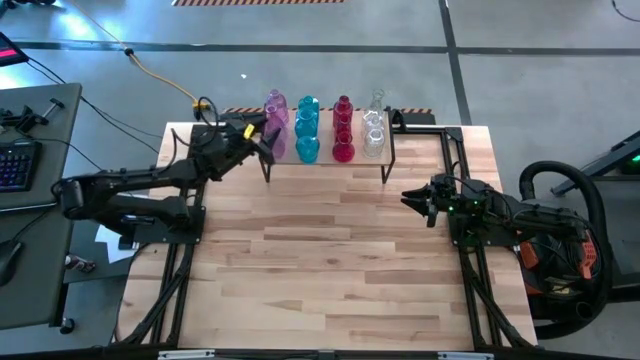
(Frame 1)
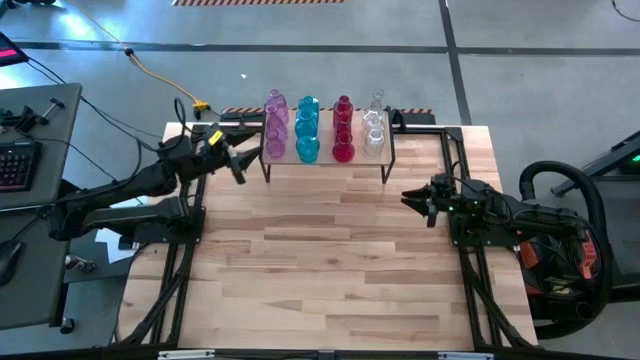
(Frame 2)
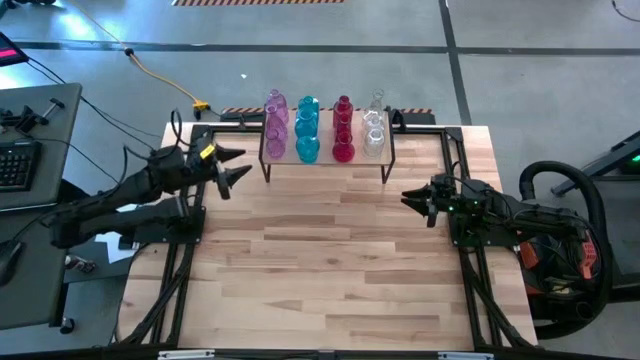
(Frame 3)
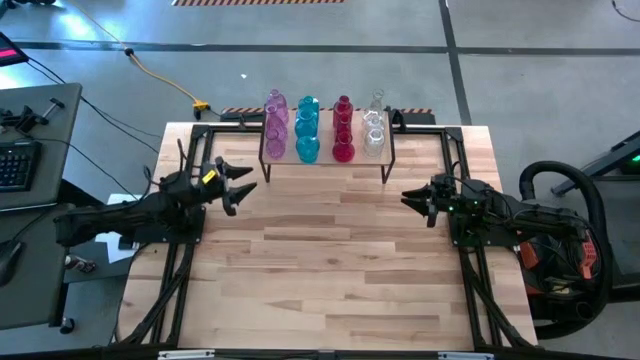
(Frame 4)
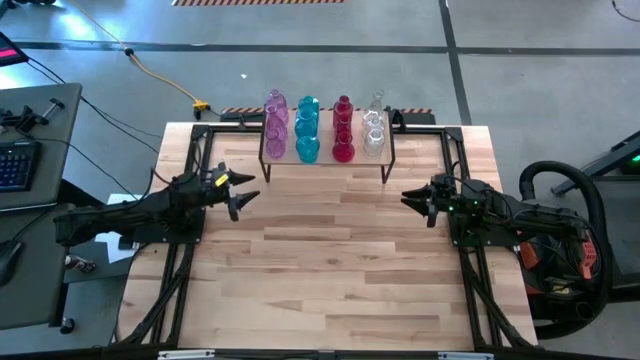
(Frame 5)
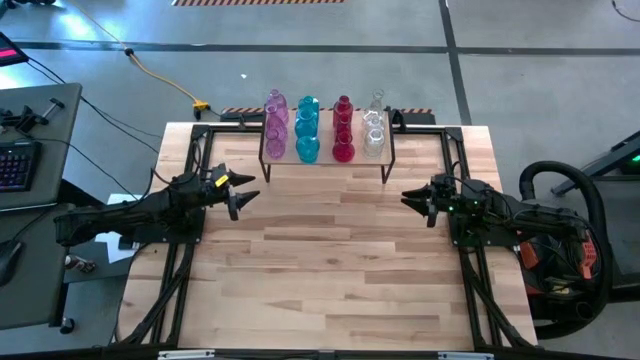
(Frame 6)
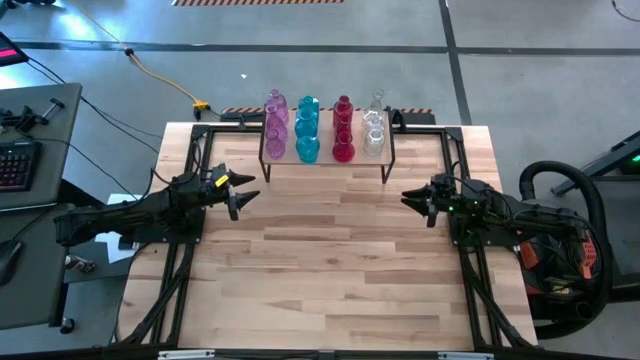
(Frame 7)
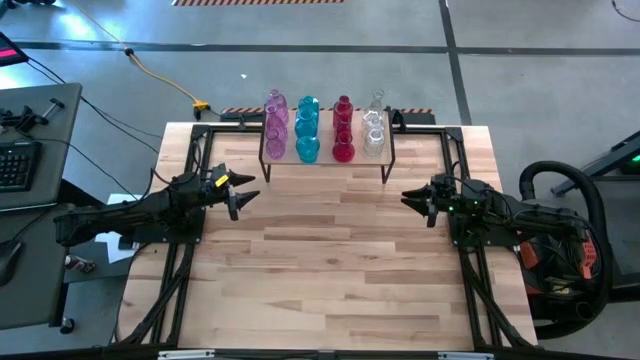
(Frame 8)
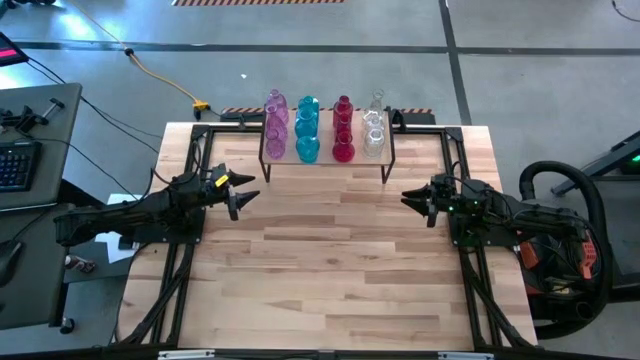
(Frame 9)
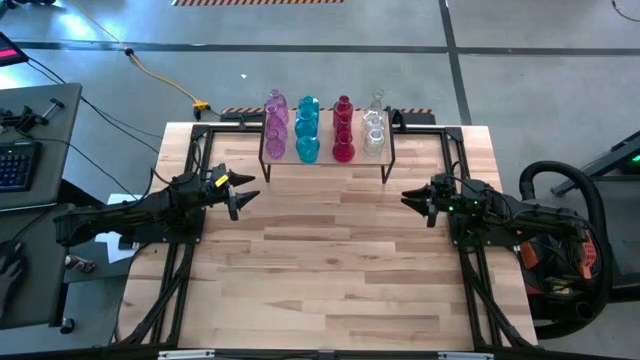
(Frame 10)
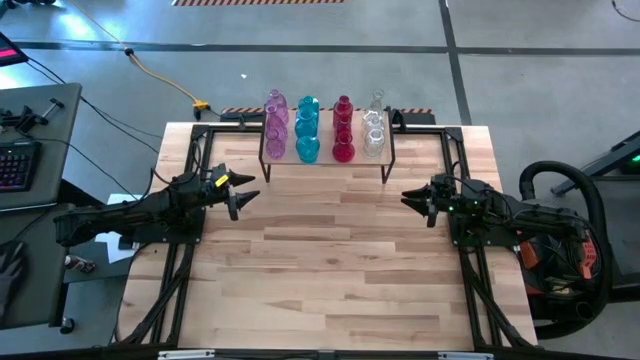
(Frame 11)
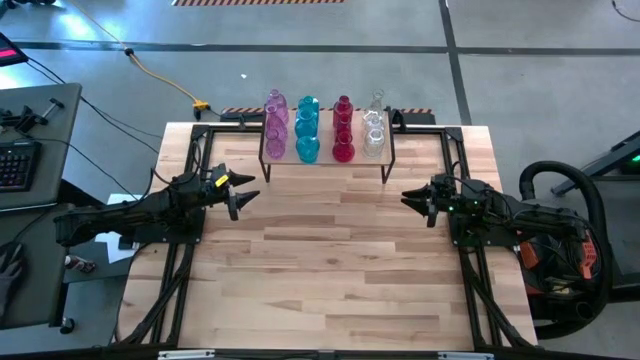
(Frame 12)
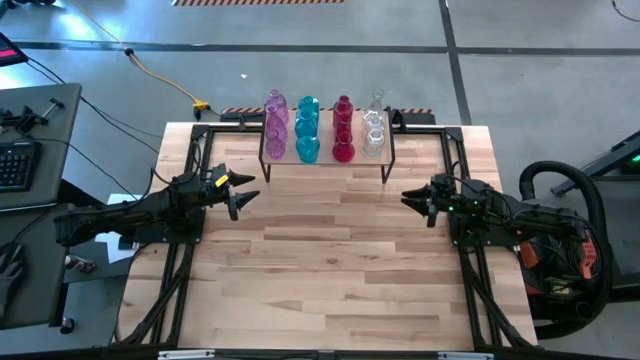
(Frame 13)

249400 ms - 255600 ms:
Task: sort vases onto shelf
Return to Home Position

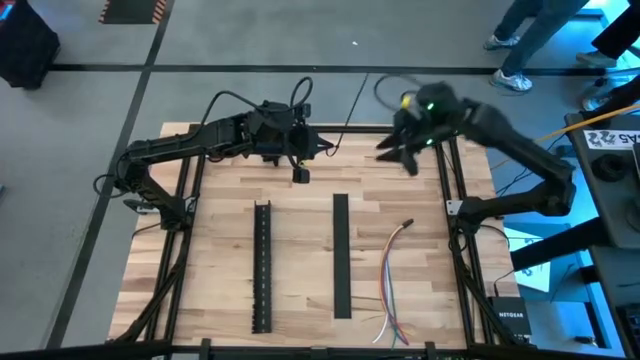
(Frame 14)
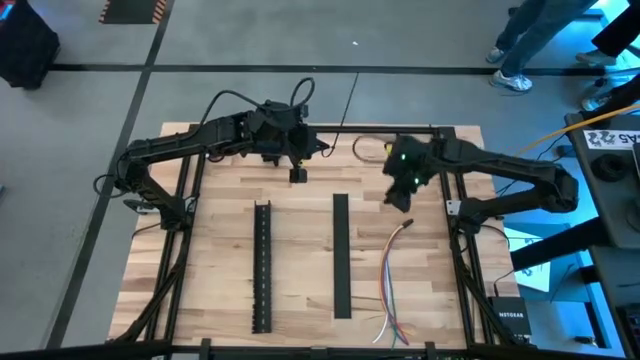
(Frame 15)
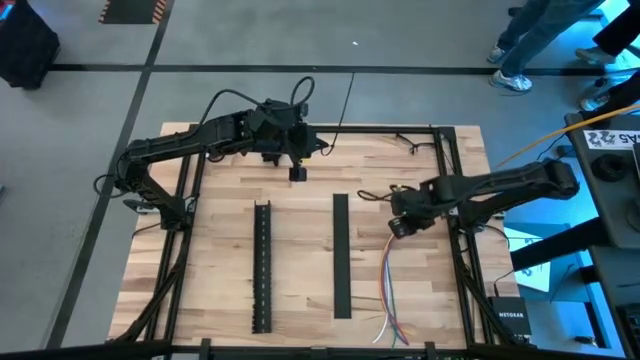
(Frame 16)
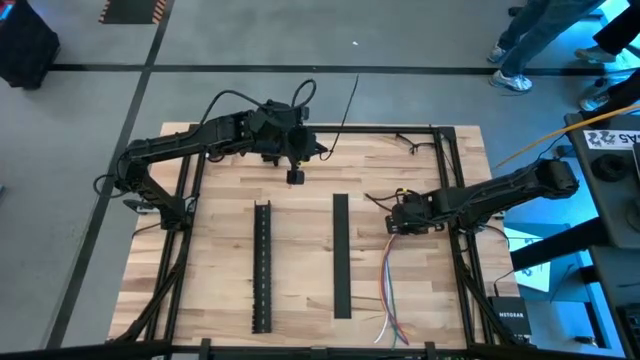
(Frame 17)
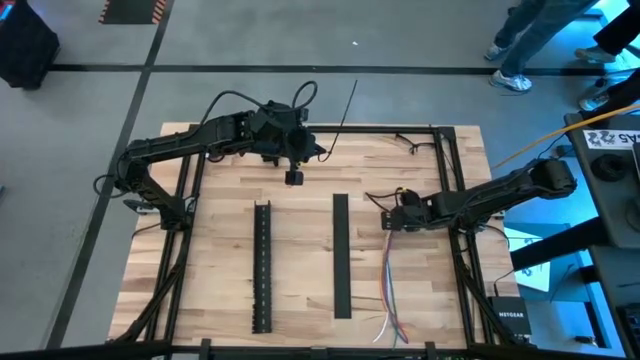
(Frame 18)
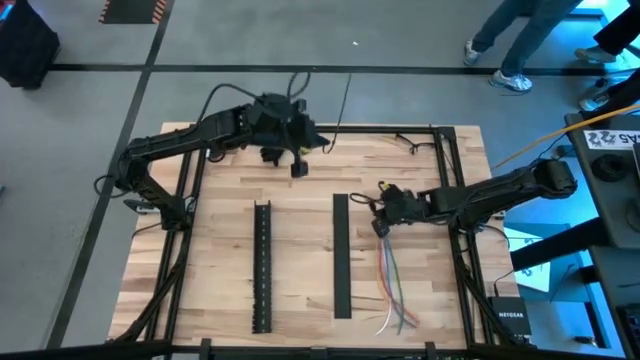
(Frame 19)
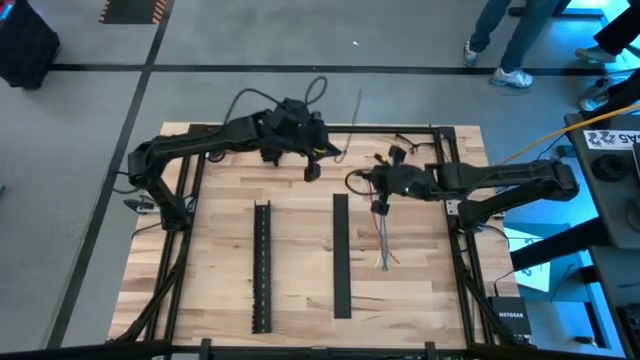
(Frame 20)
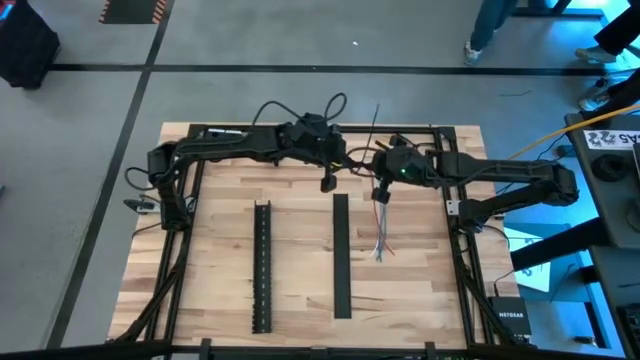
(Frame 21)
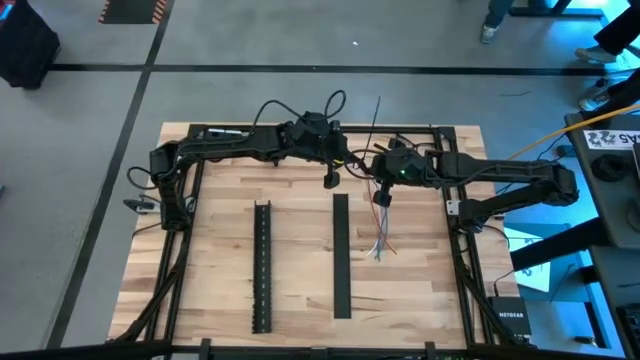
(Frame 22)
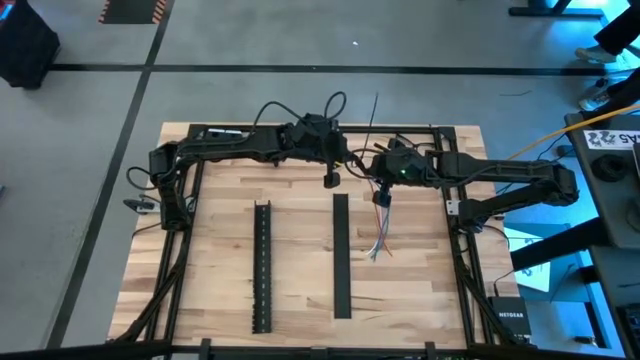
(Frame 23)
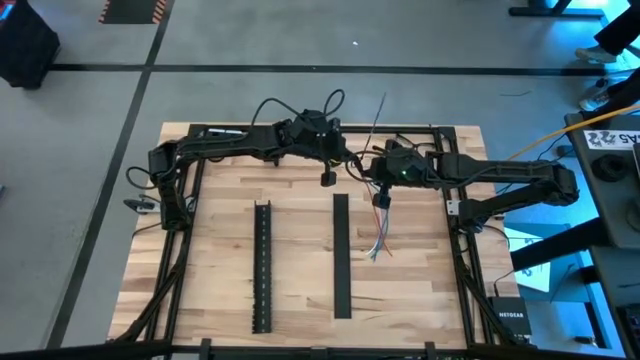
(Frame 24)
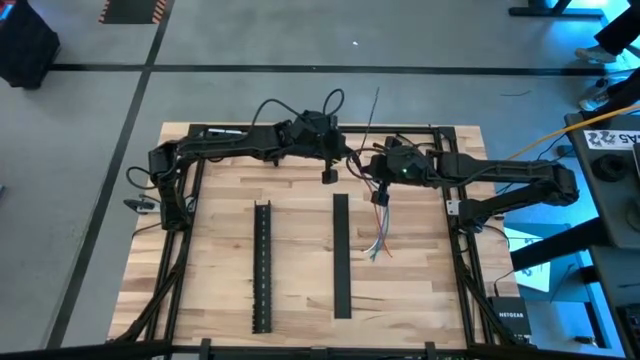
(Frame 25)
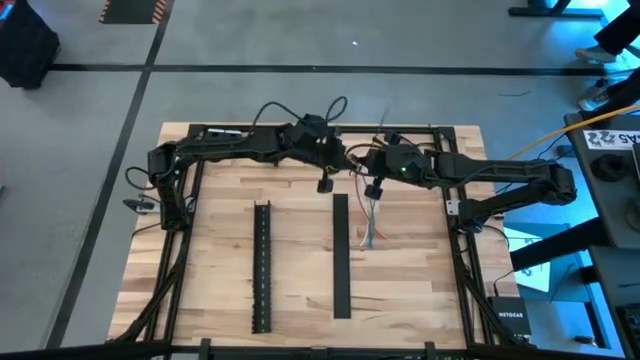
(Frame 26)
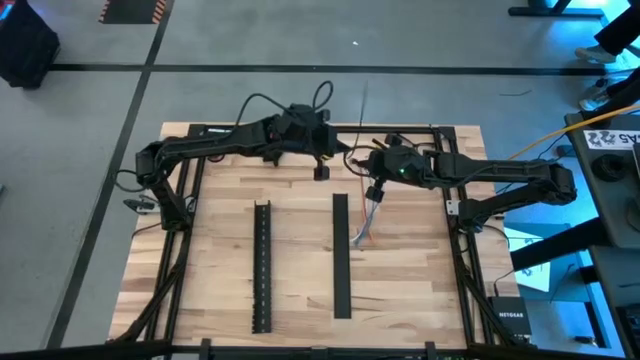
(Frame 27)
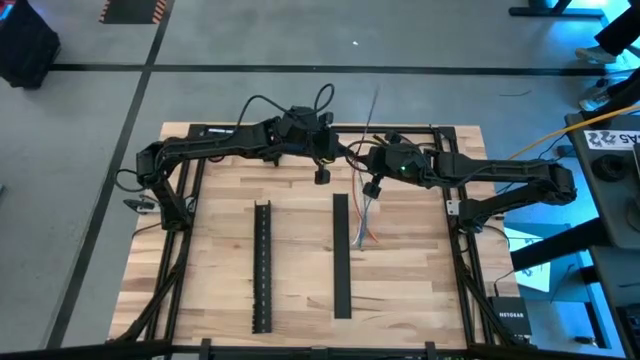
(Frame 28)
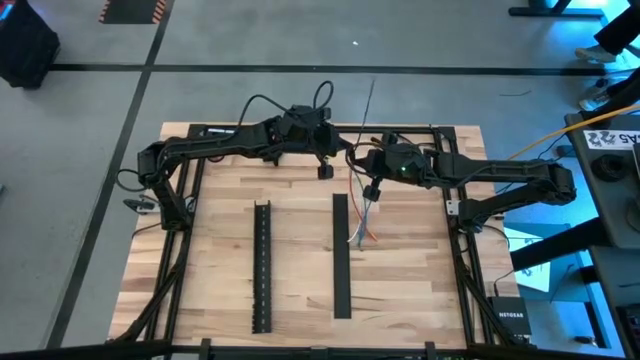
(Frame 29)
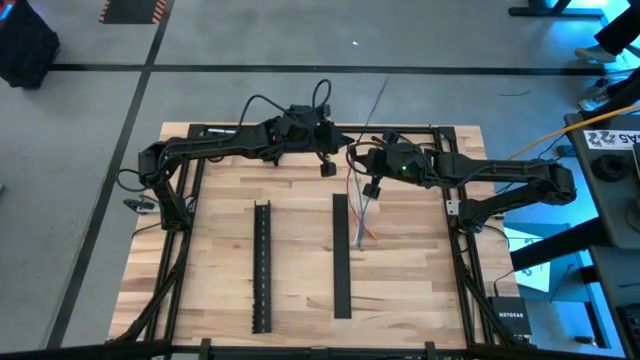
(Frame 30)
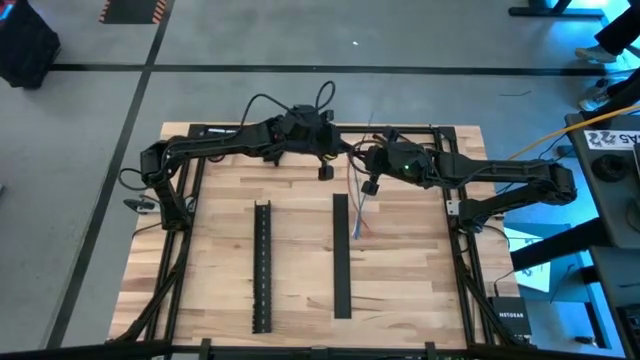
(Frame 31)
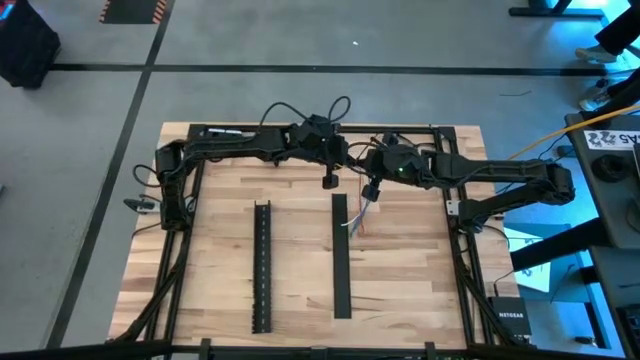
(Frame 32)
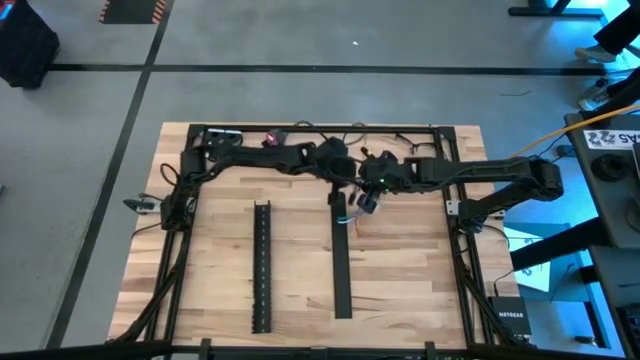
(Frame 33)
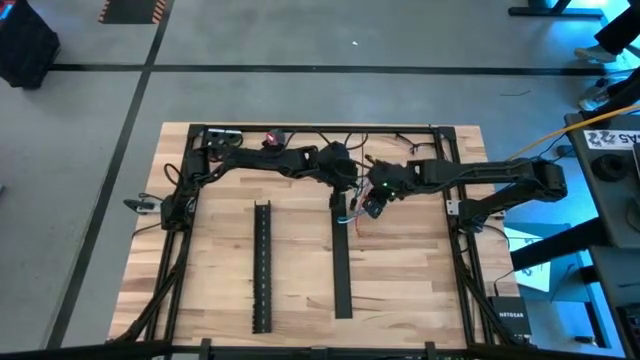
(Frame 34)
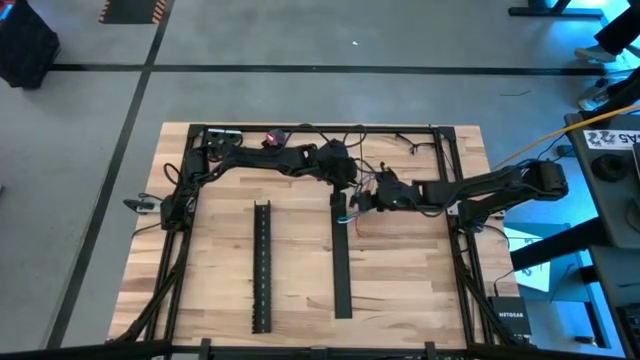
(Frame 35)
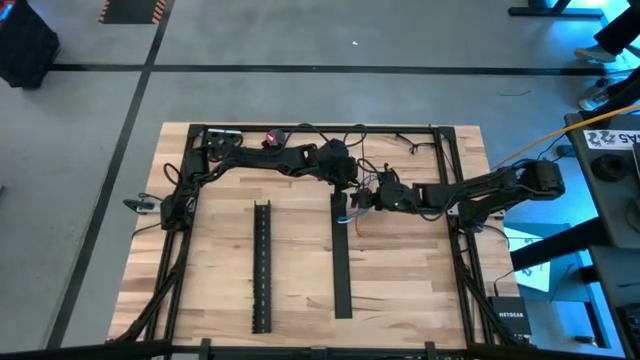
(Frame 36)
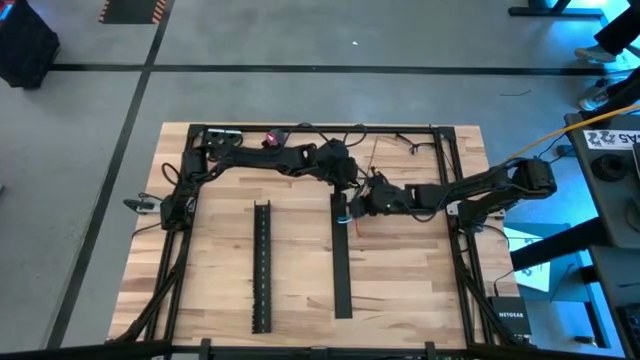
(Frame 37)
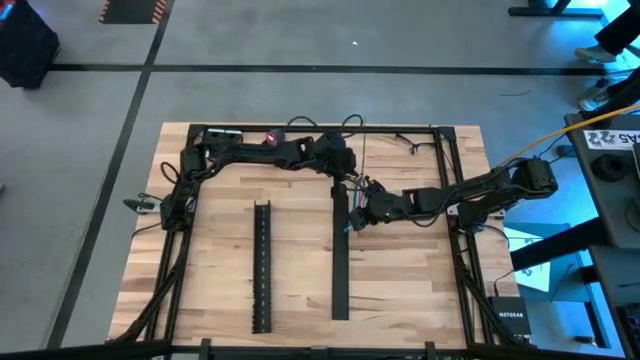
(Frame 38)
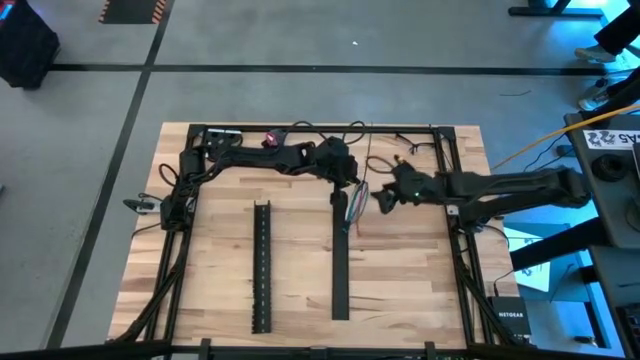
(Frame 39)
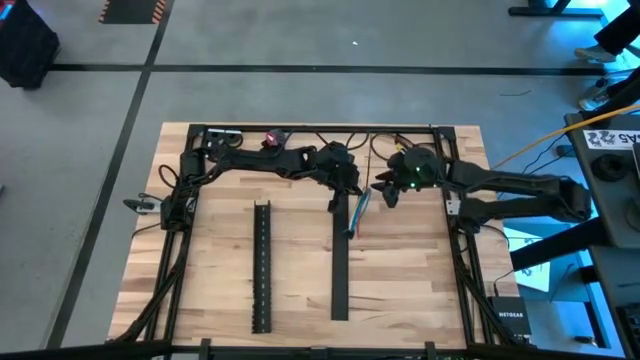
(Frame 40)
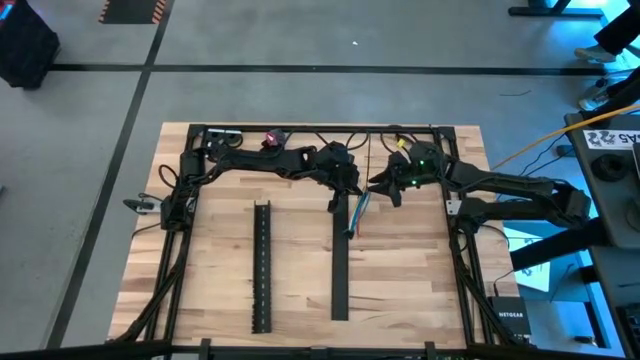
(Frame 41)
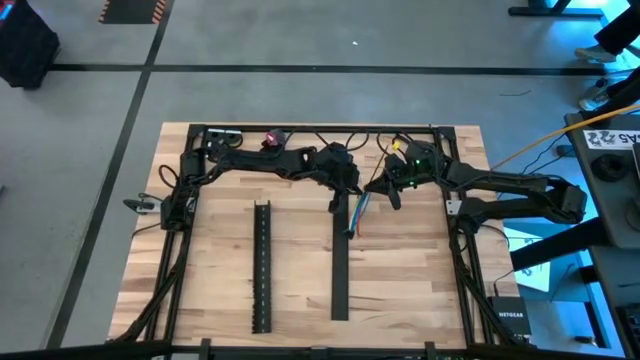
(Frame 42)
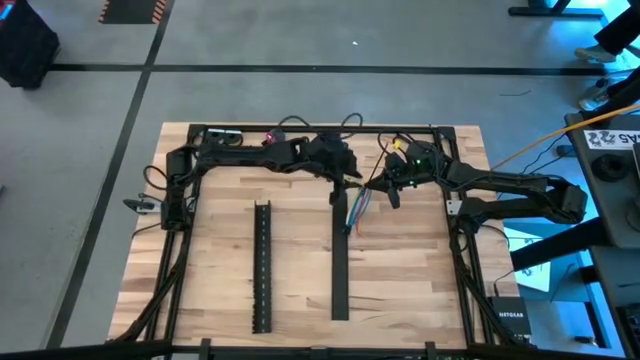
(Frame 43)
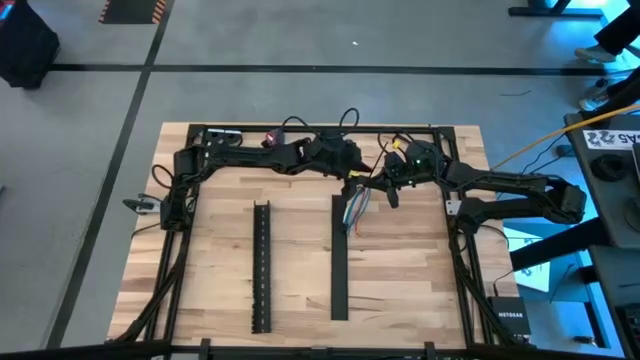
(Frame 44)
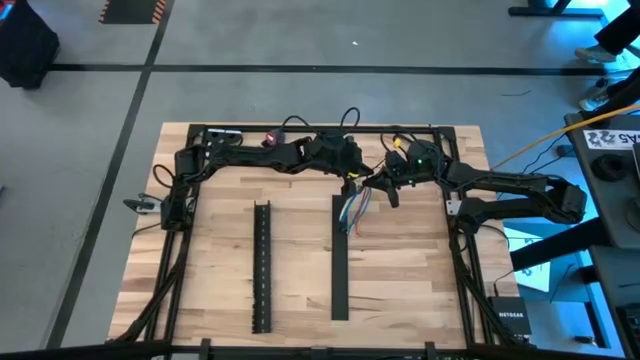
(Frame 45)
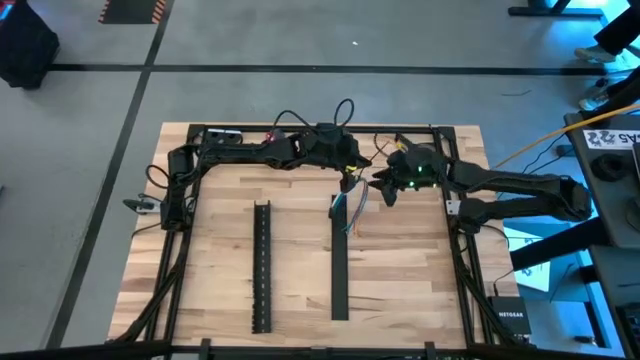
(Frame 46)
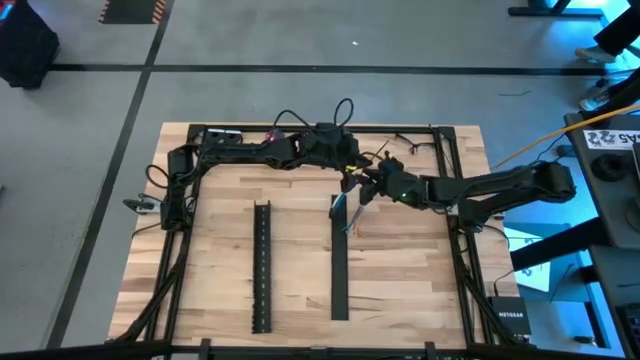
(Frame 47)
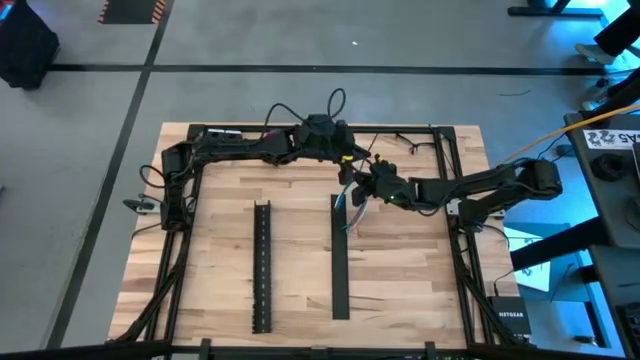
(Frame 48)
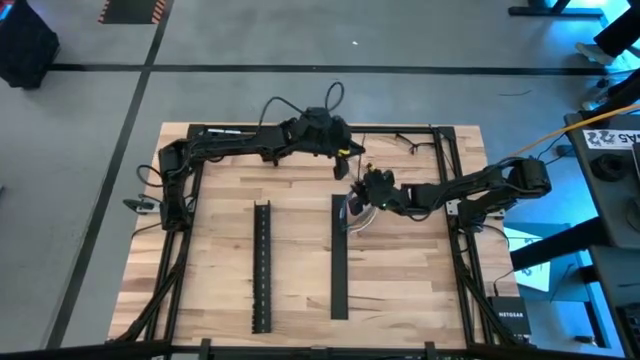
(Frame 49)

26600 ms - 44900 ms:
Task: Ziptie cables
Insert the cable wires into the black zip tie
